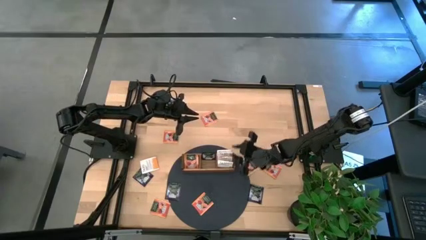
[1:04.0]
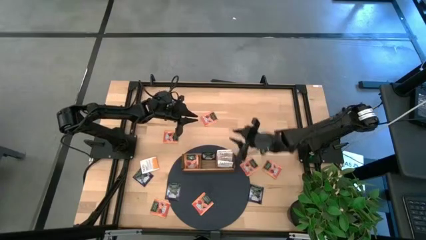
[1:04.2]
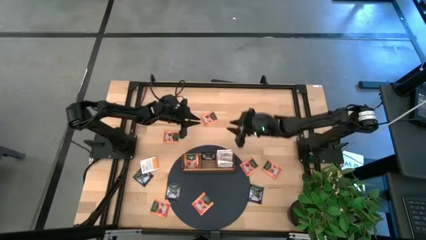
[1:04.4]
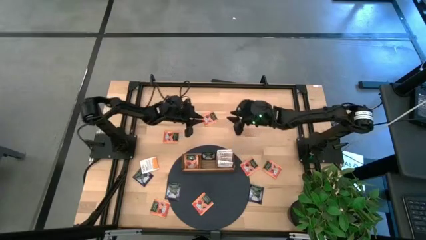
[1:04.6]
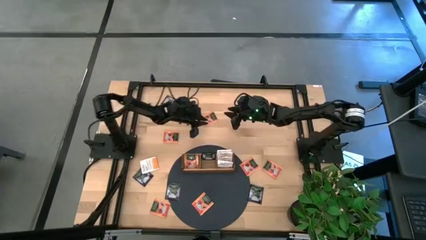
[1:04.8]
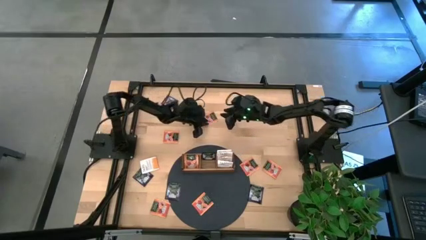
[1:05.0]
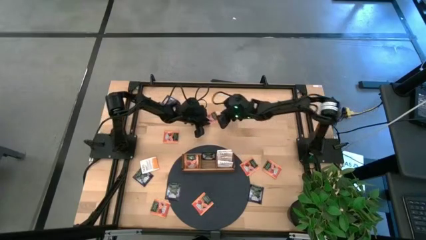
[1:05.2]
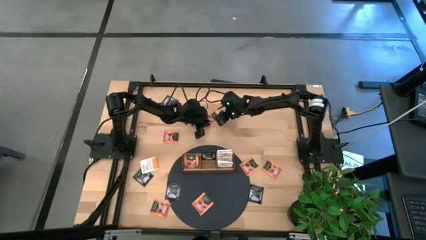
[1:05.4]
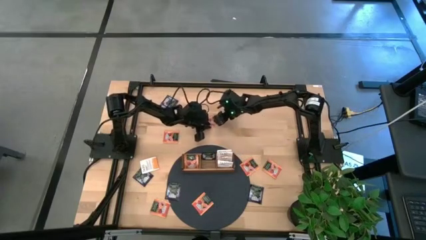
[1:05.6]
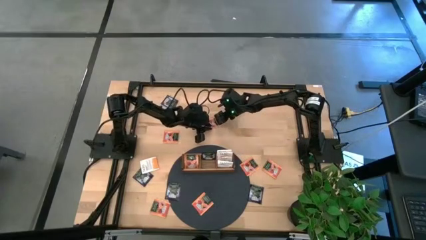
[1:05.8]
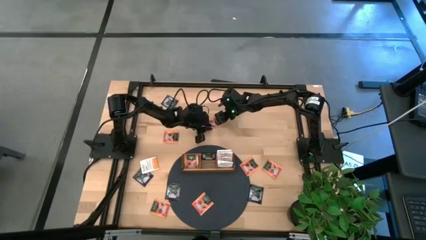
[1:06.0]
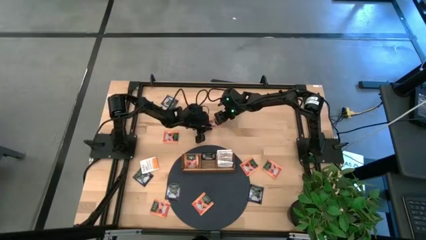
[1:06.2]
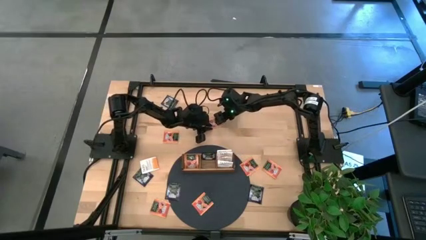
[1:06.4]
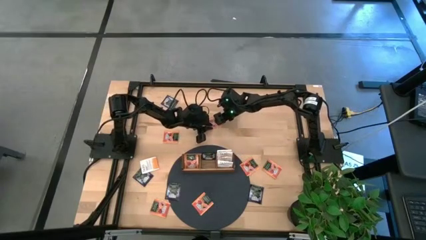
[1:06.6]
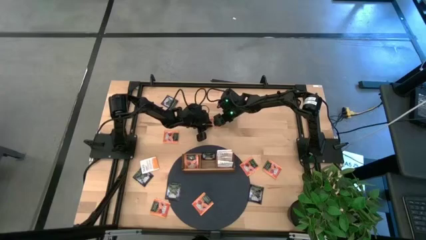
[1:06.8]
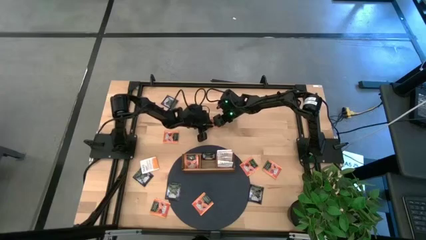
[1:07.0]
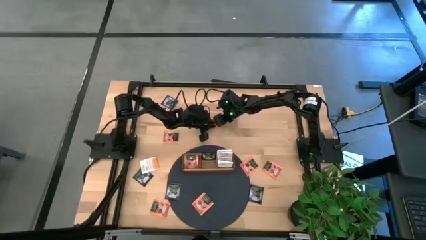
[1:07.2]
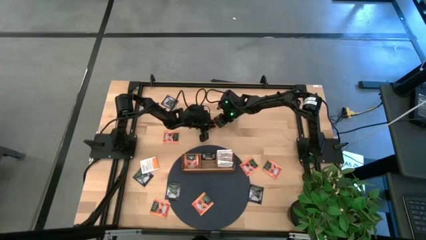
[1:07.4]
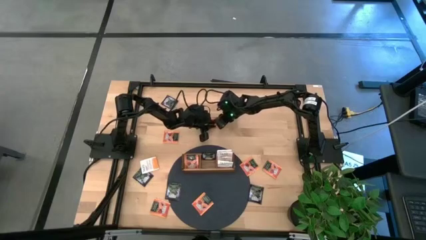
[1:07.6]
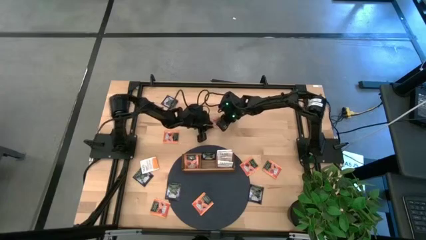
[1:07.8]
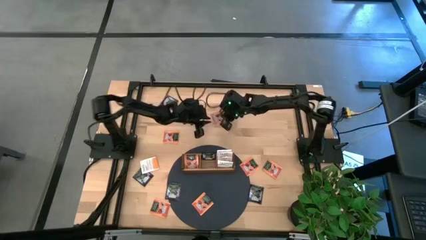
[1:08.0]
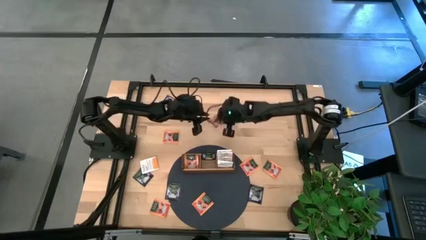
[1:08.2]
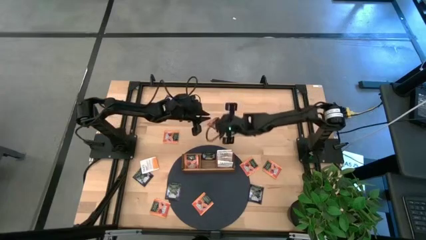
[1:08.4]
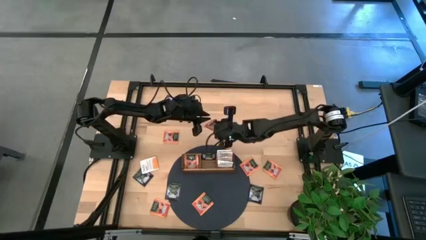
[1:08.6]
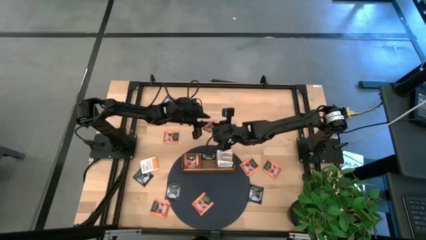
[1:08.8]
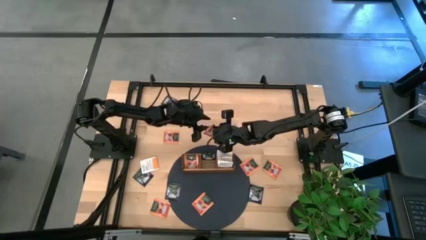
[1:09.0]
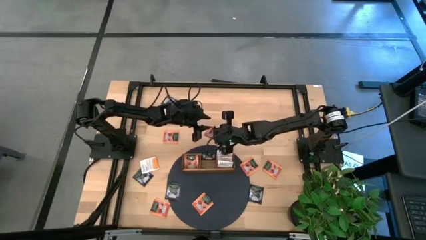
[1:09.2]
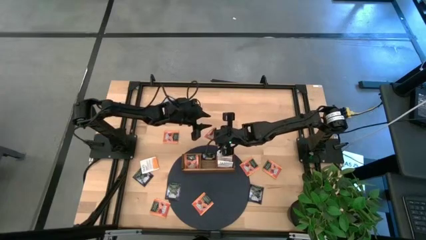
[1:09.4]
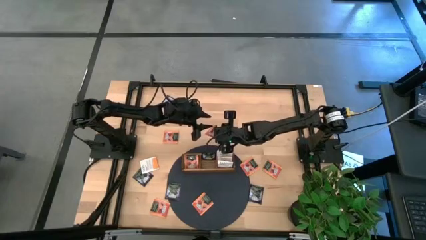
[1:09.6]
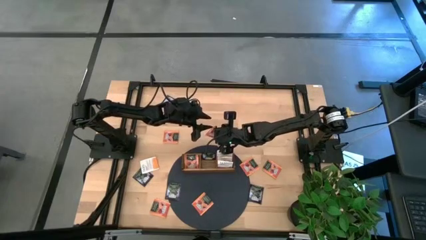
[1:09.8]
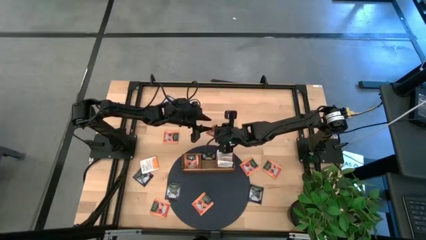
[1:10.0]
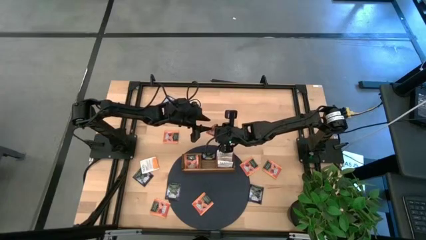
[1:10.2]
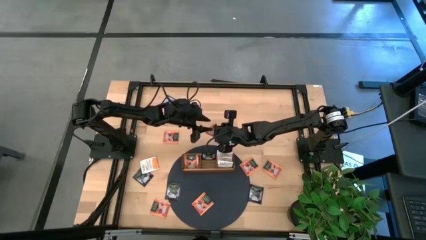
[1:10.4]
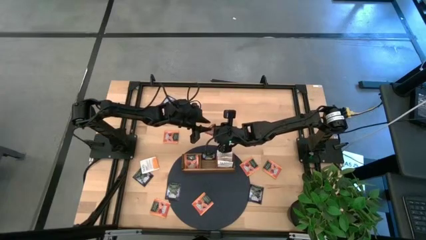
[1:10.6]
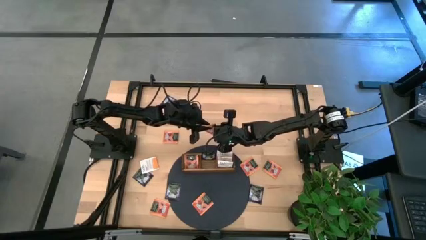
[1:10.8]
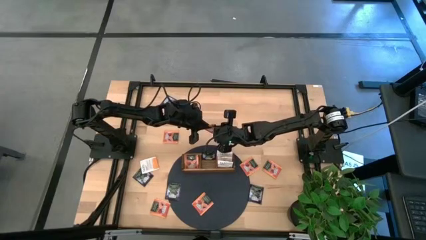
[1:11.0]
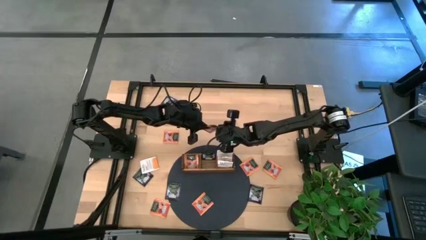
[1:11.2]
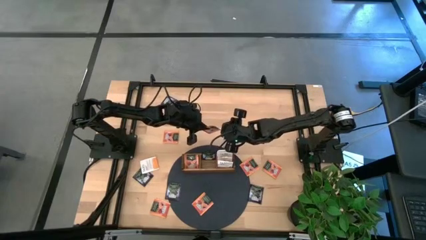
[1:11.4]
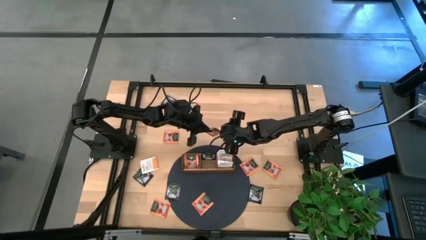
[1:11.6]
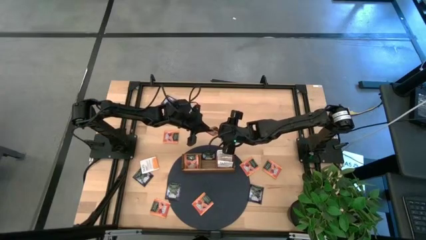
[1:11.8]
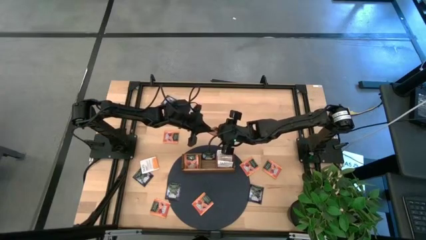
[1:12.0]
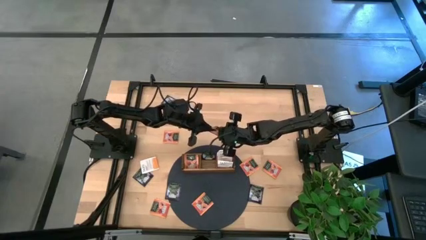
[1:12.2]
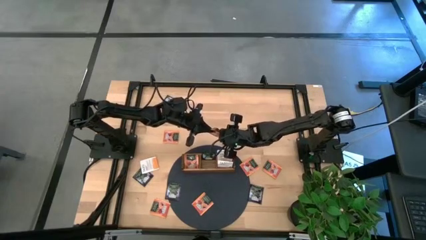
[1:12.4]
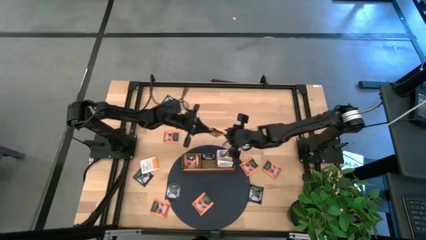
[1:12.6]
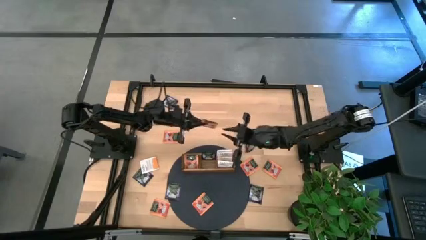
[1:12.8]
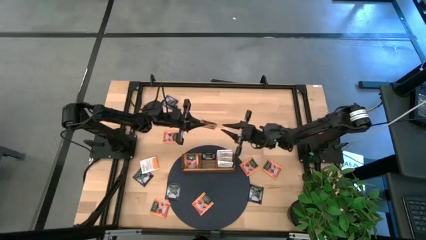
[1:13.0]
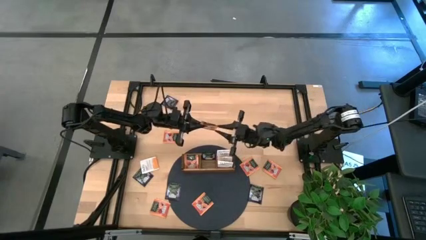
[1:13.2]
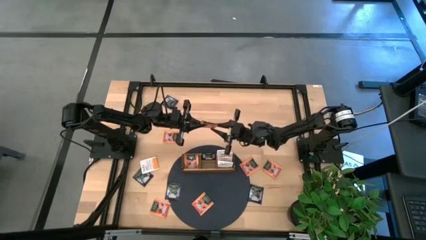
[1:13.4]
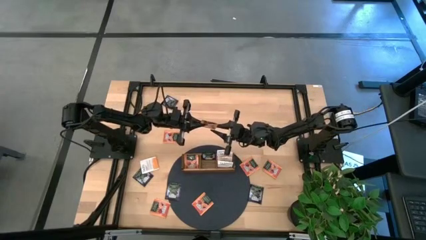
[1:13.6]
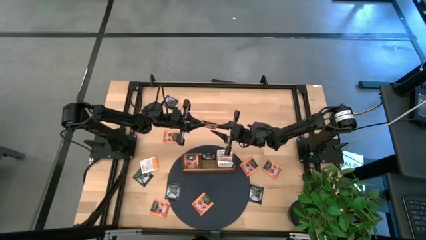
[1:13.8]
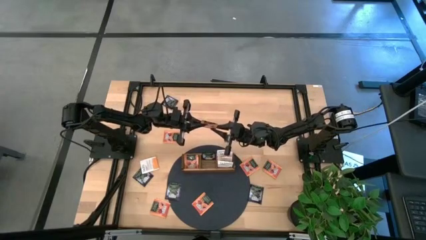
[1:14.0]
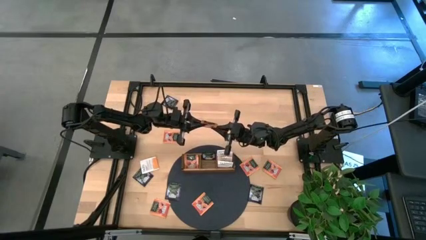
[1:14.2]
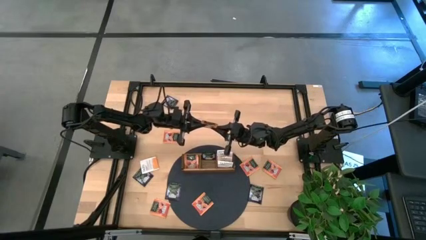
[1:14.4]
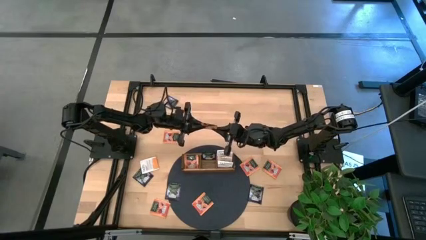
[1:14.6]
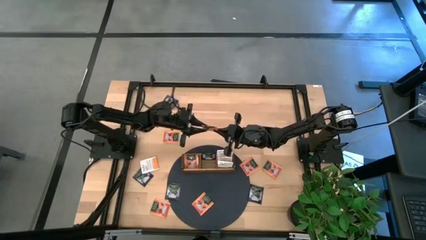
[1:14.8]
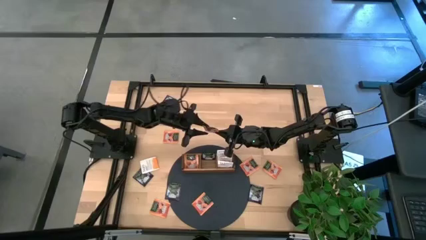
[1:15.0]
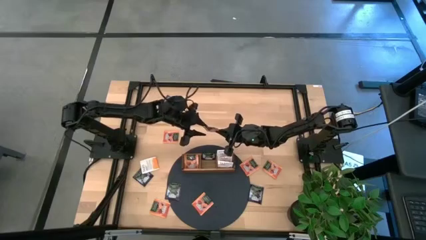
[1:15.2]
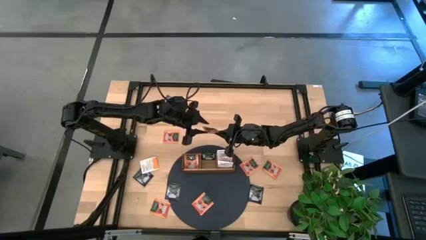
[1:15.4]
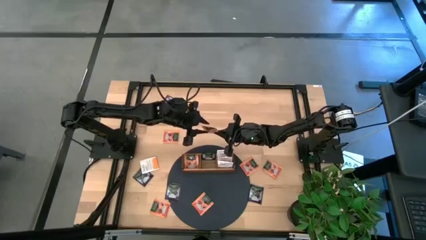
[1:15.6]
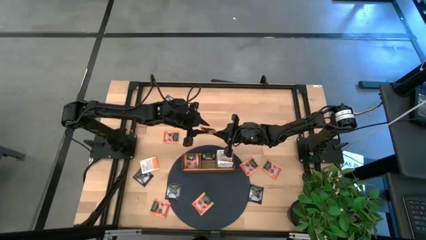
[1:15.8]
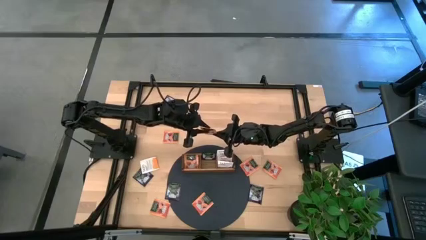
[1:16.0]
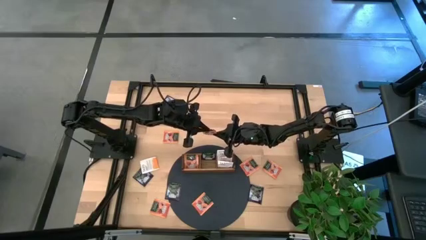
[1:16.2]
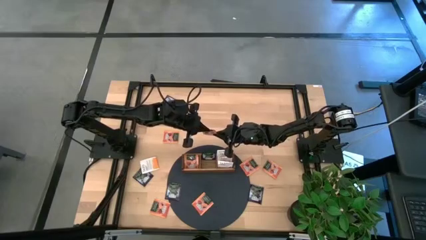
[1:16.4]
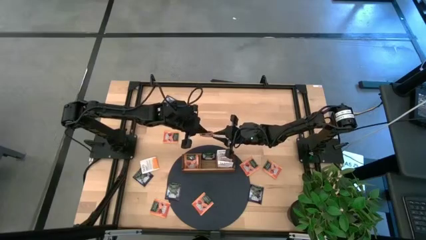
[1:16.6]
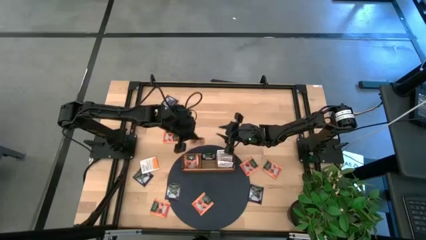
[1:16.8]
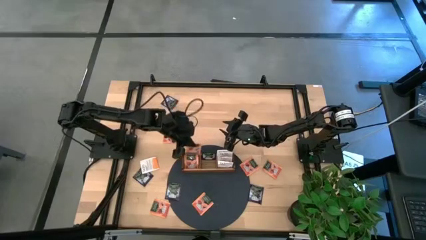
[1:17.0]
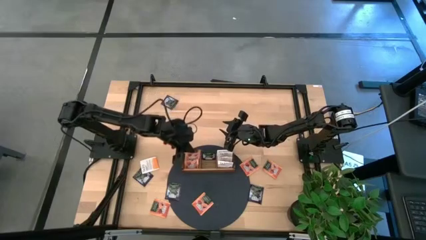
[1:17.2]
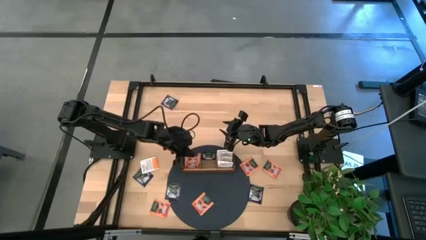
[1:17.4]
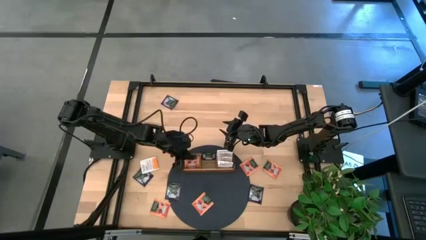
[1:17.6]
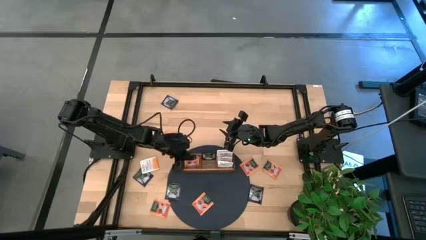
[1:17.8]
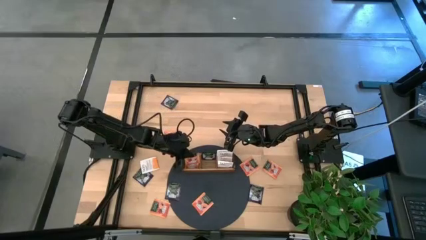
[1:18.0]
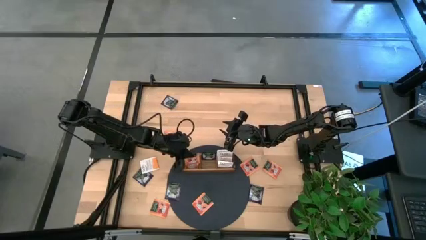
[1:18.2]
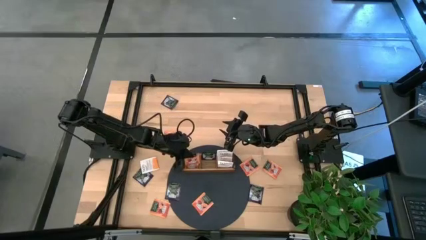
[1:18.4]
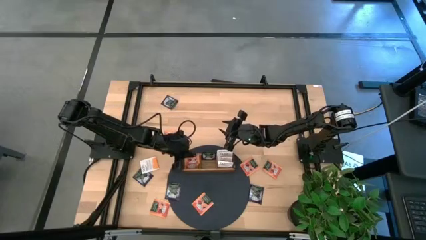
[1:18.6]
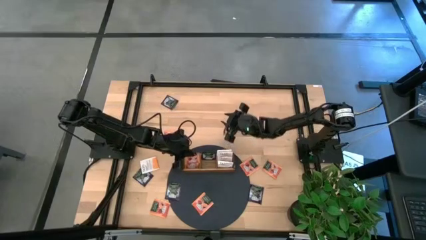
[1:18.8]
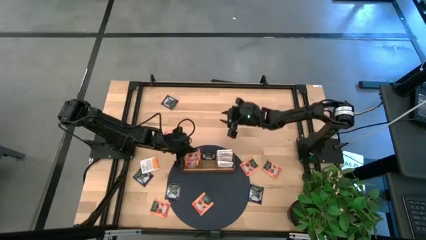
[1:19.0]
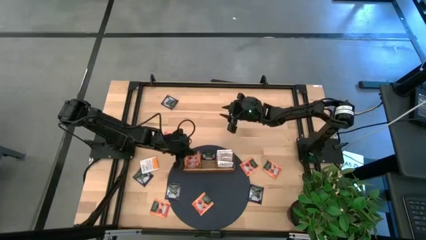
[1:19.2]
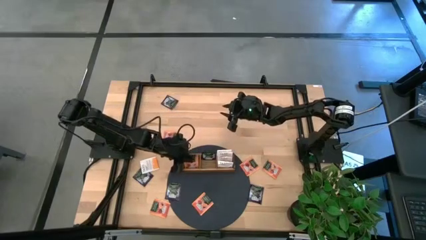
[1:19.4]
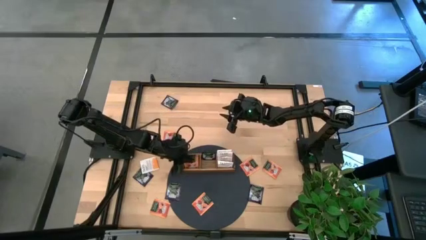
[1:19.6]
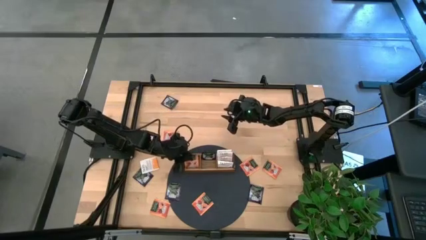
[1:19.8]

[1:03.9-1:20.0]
Task: Pick & Place Tea
Put the orange tea bag into the left section of the wooden organizer

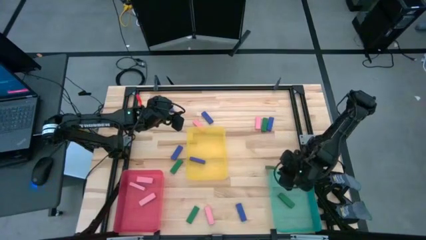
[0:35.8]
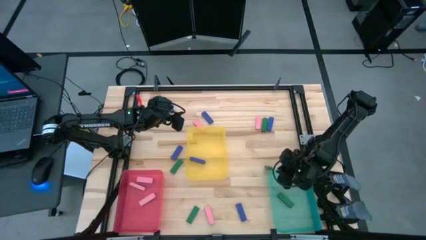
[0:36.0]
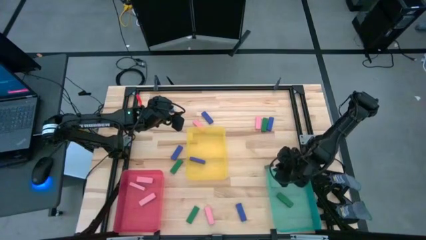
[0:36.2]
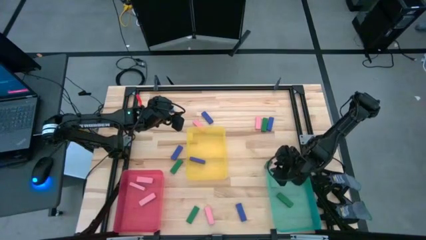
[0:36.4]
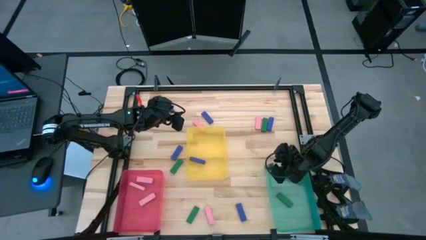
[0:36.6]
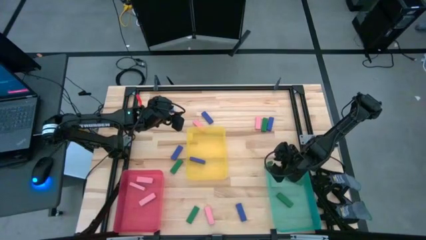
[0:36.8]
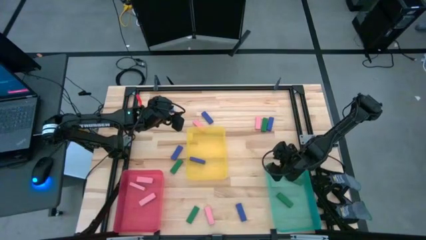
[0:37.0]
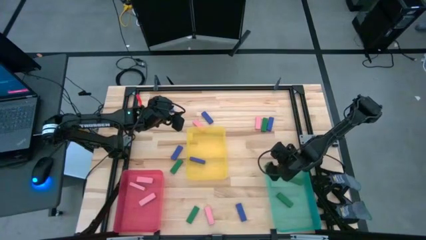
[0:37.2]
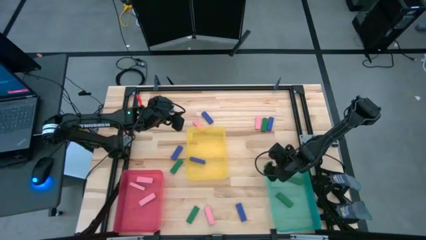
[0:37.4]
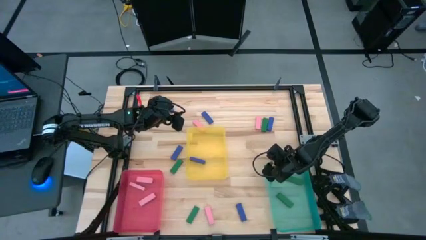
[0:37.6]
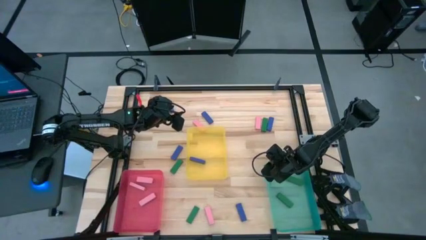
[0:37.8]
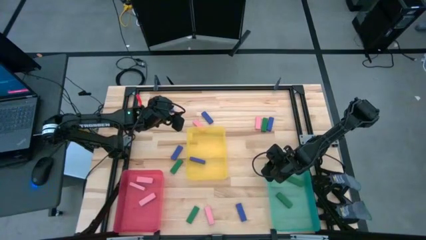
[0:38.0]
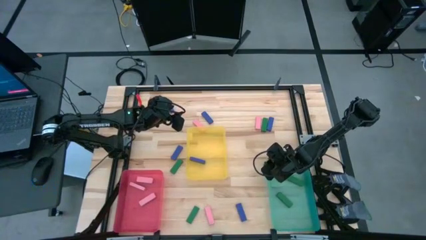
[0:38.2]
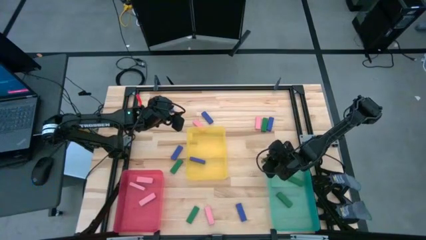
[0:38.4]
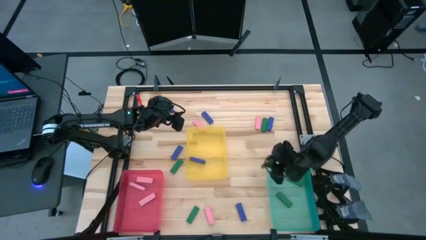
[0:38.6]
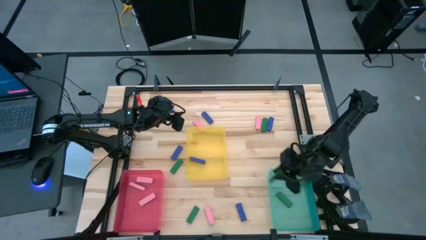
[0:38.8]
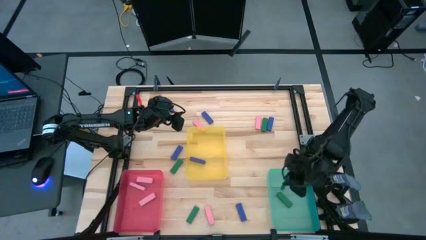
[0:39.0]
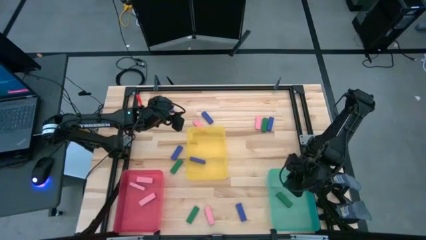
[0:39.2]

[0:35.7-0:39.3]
Task: Sort blocks
Put the green block into the blue bin
